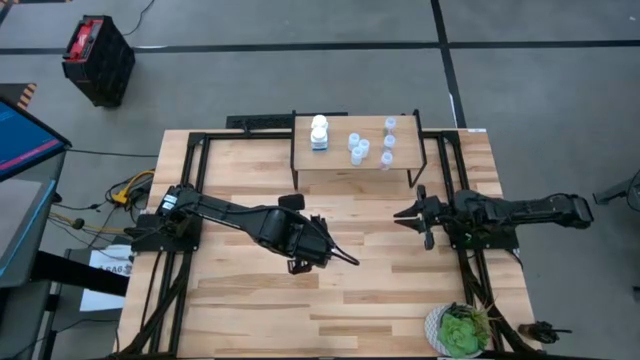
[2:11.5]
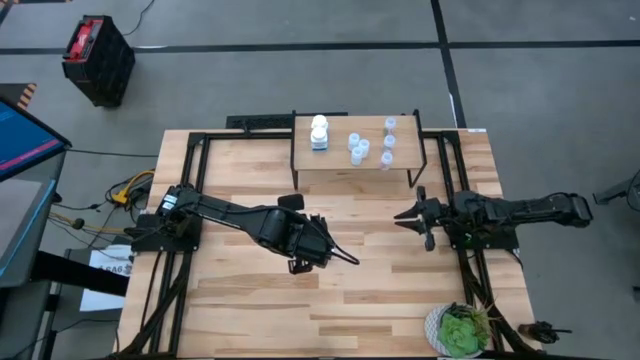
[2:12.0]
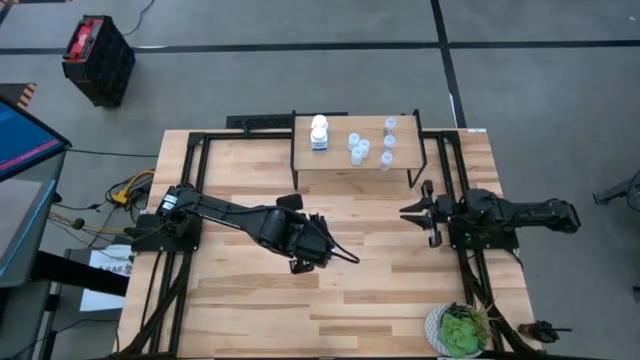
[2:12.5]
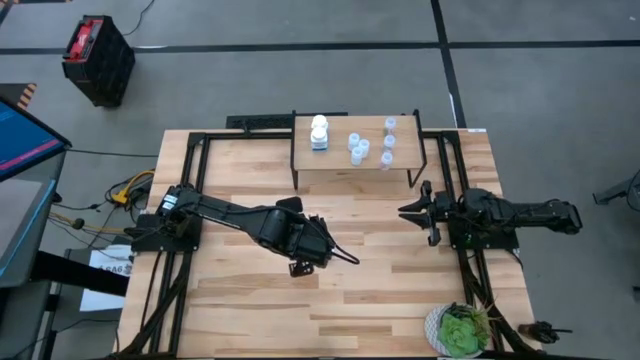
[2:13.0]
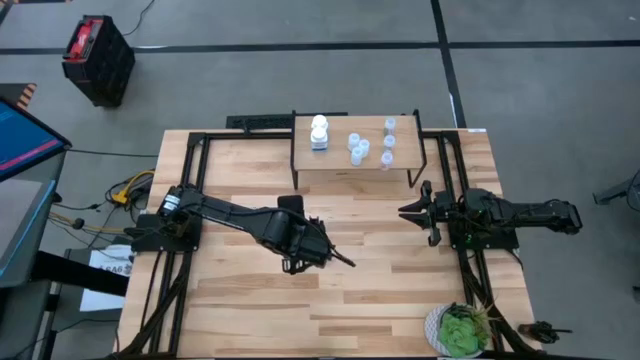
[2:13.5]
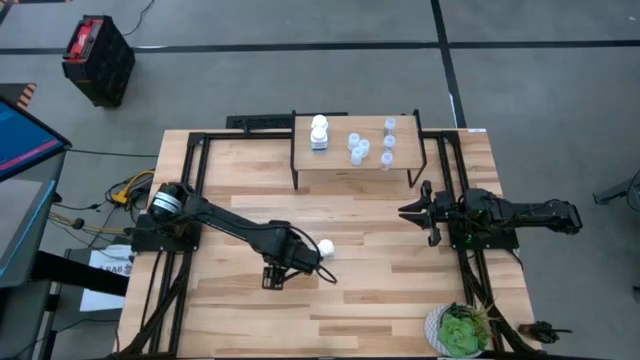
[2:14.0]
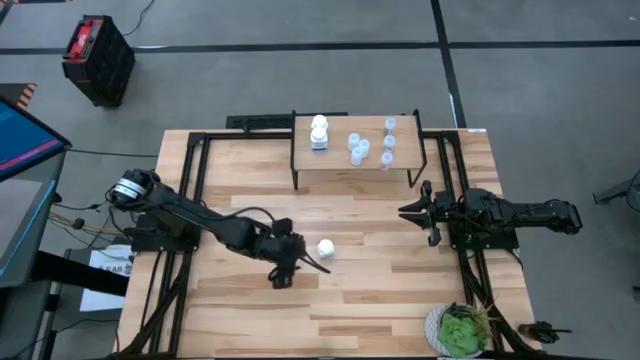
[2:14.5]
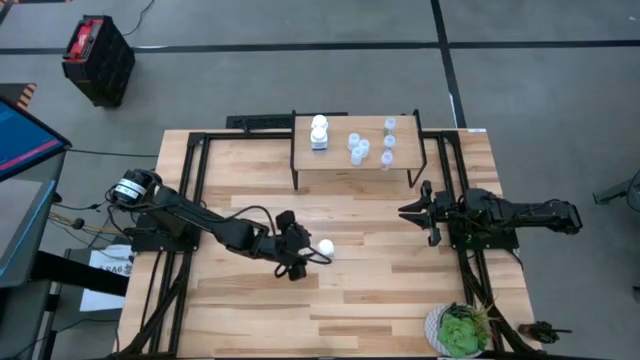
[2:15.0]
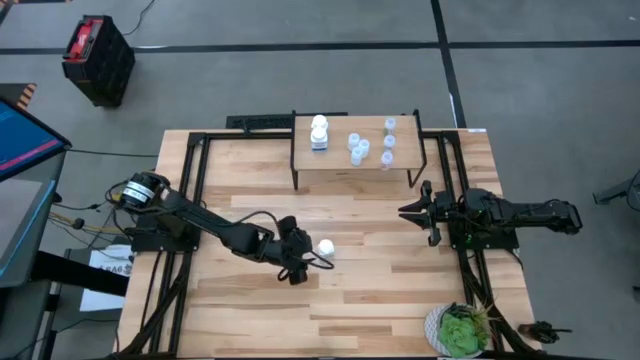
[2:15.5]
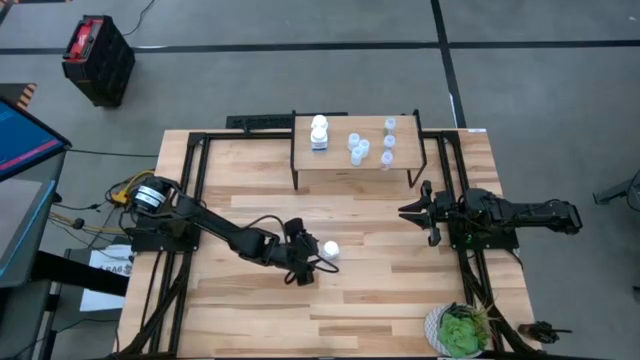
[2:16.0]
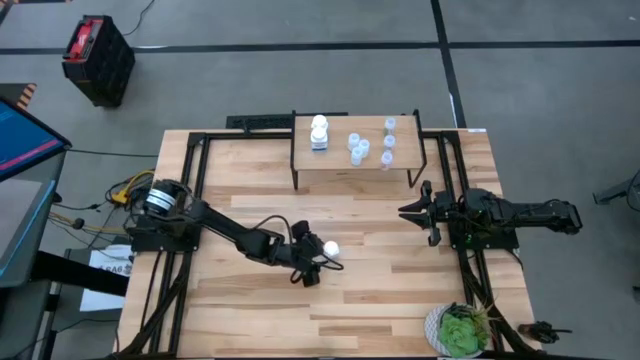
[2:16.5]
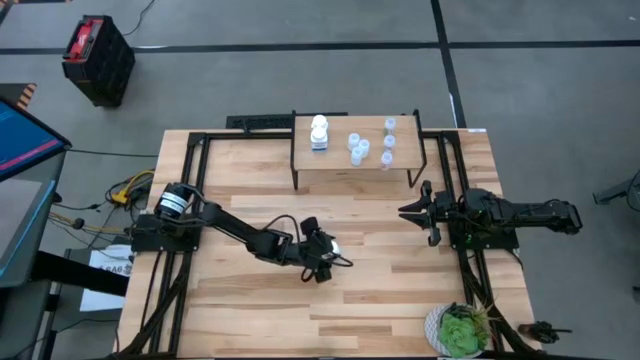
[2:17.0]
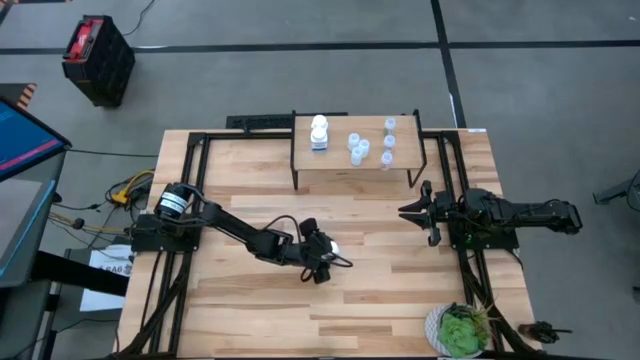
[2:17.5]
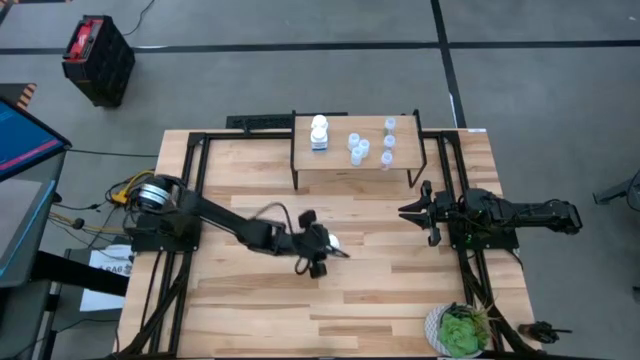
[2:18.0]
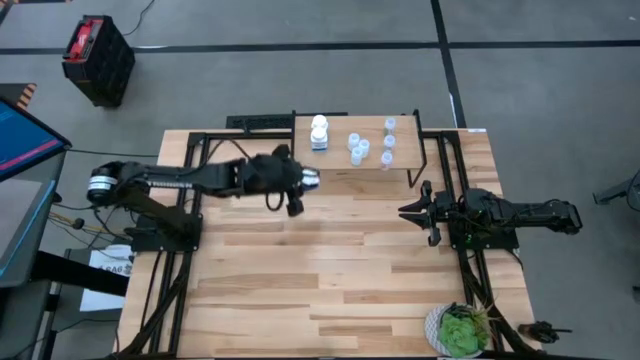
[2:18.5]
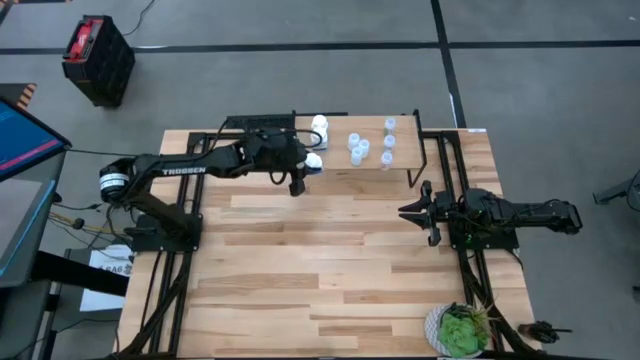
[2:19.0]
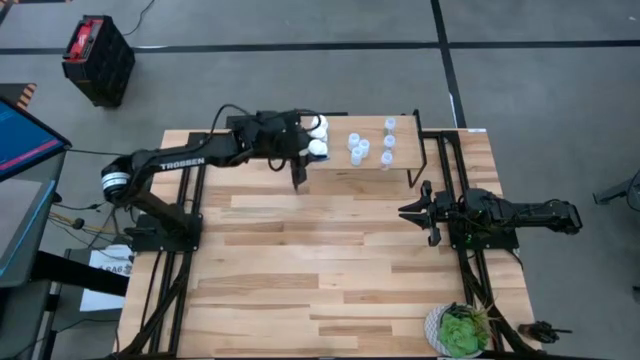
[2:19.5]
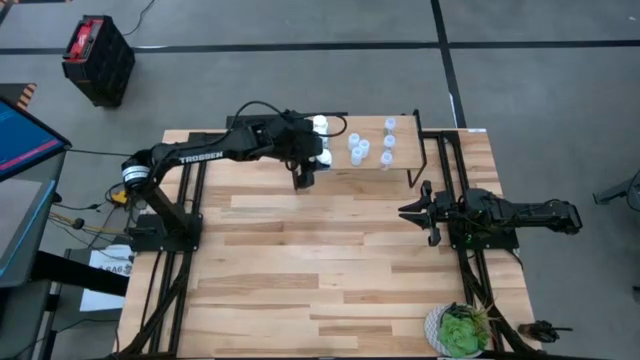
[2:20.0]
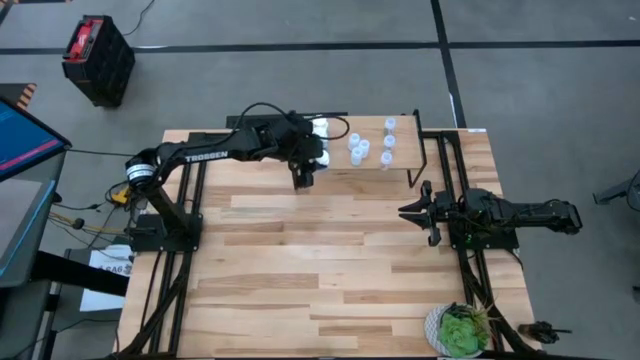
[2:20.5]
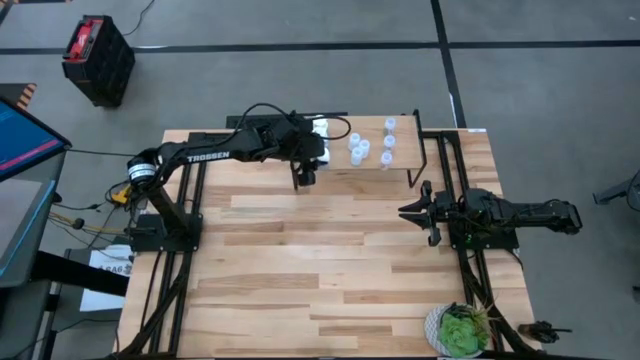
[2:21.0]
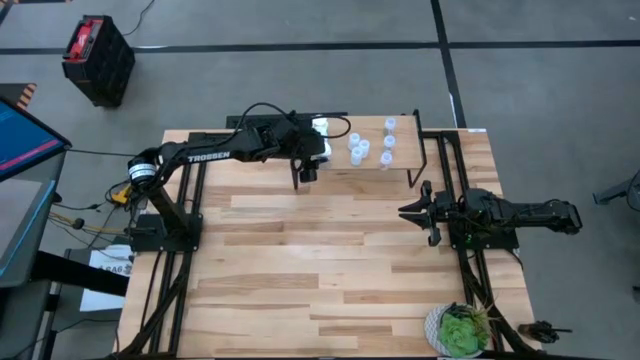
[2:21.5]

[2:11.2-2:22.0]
Task: Pick and place medicine bottles onto shelf by color
Put the opaque medicine bottle onto the left side of the shelf

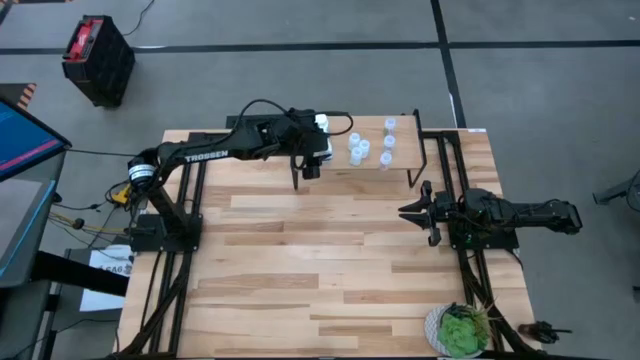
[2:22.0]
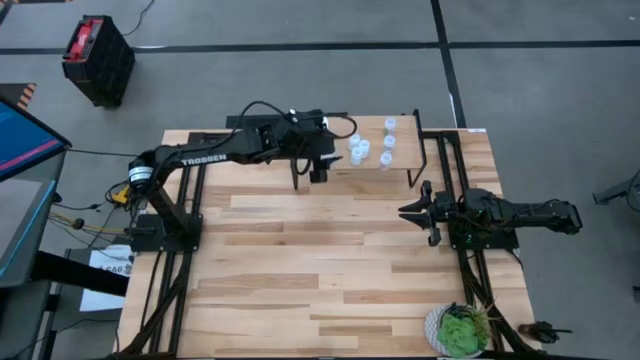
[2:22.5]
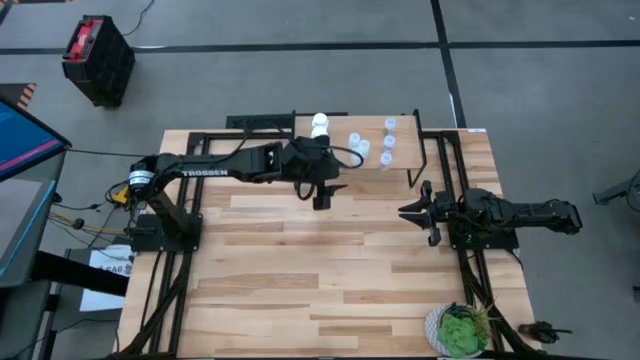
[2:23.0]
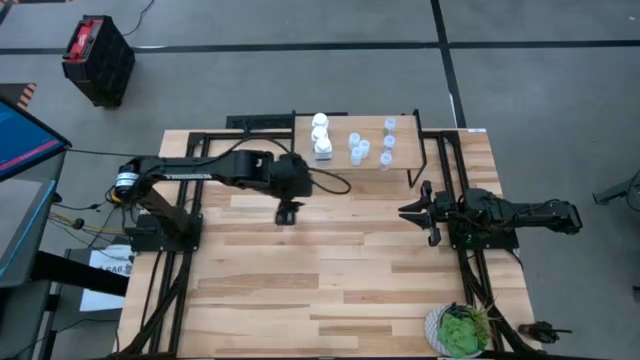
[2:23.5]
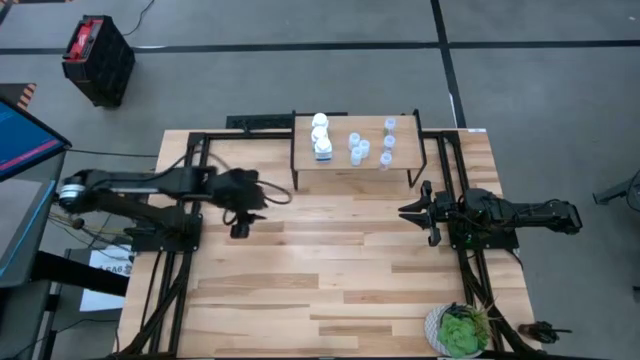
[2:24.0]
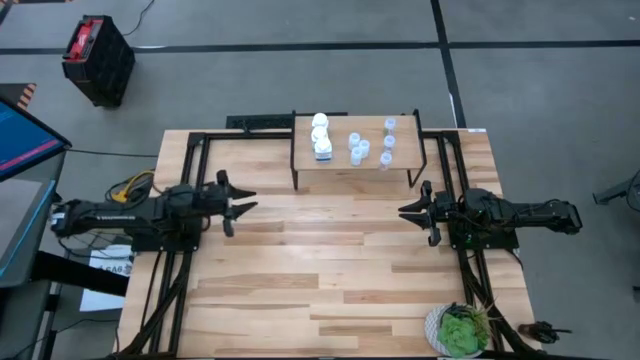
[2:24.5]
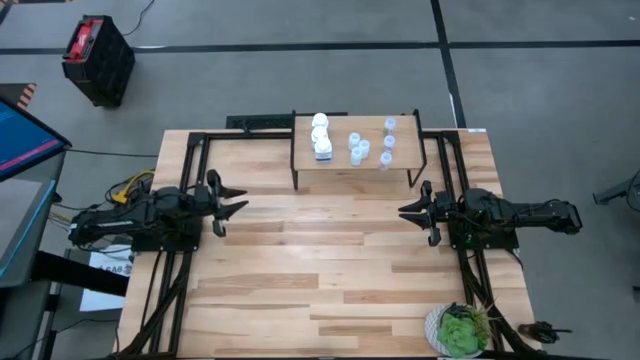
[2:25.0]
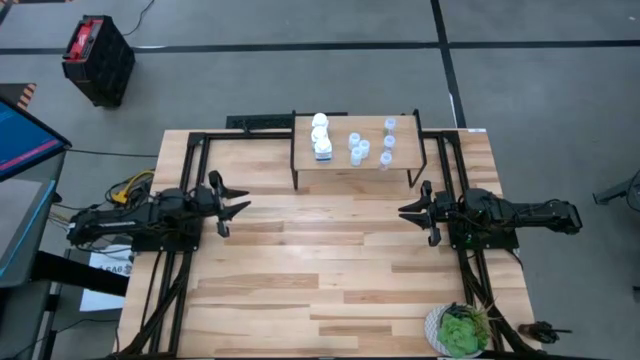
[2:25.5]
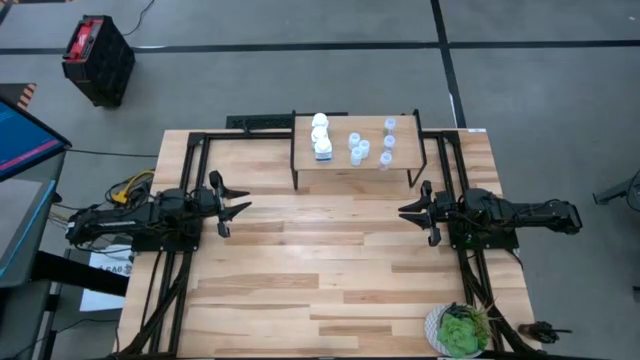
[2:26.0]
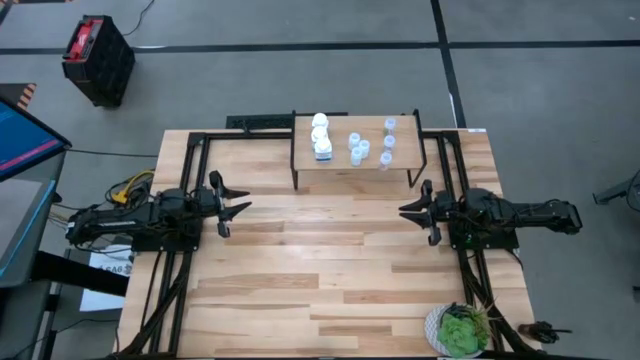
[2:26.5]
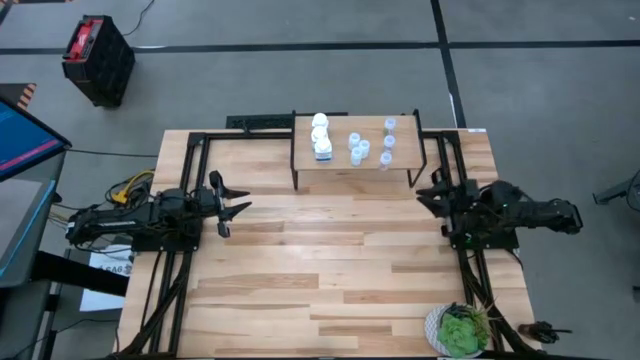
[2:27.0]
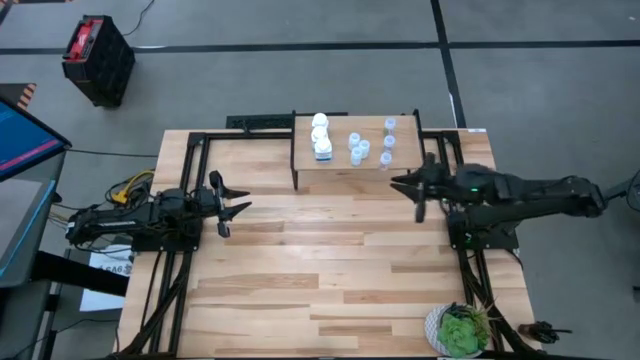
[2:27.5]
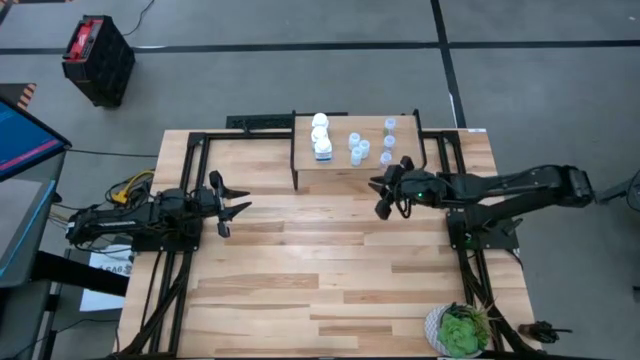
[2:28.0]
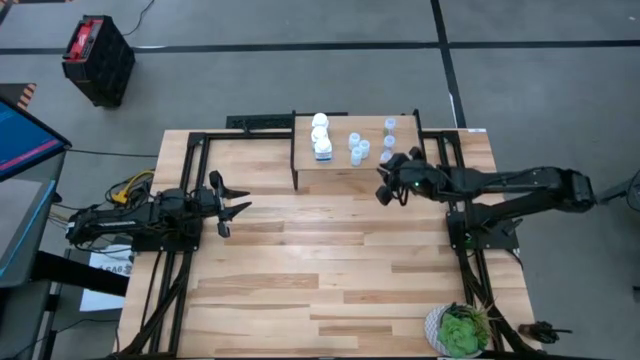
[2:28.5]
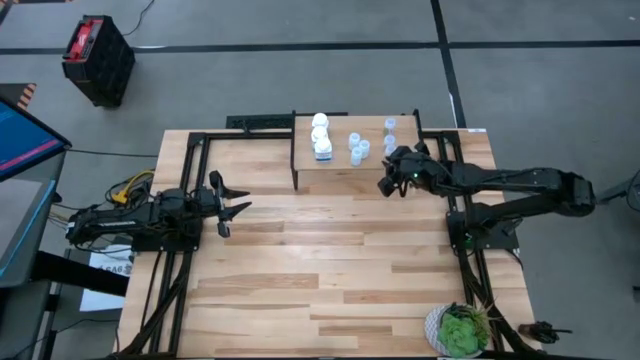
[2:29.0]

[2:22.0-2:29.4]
Adjust the transparent medicine bottle on the shelf

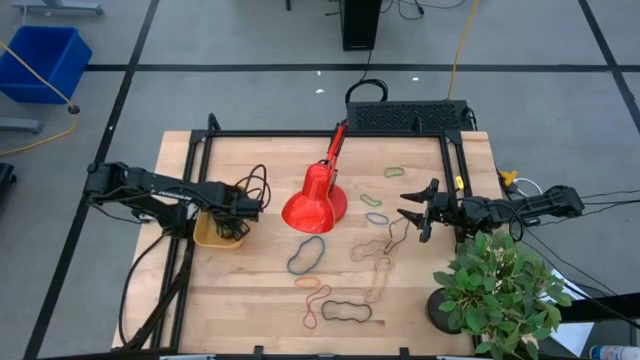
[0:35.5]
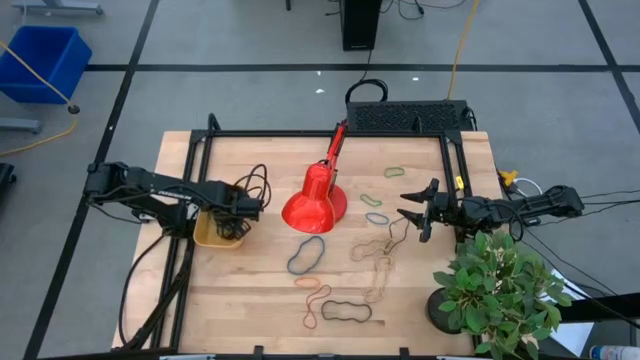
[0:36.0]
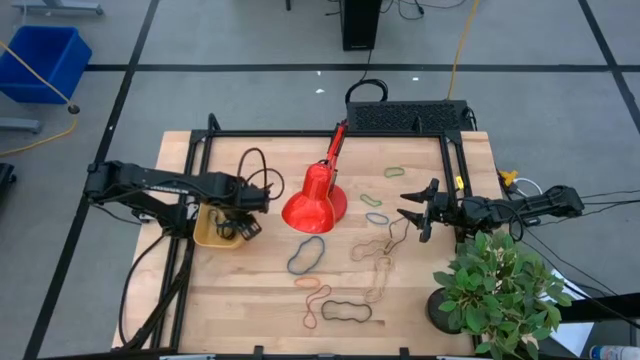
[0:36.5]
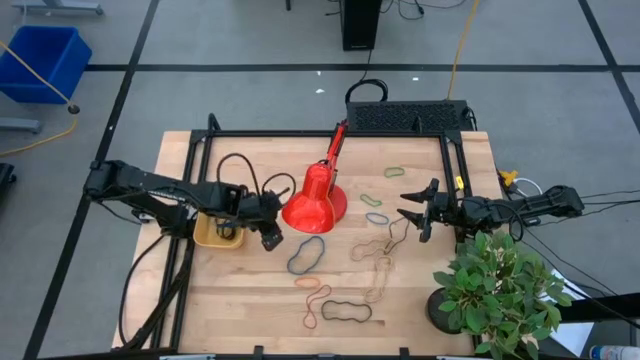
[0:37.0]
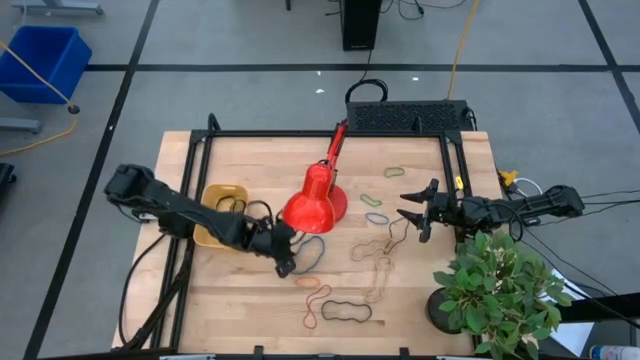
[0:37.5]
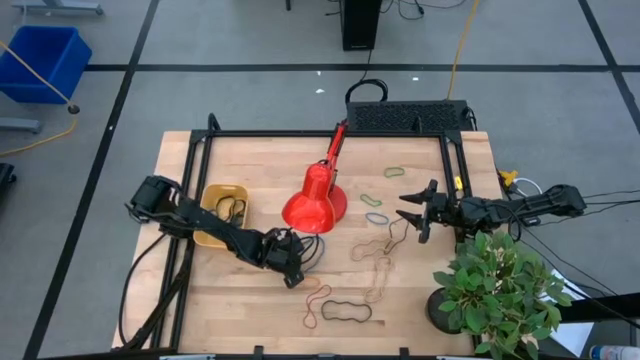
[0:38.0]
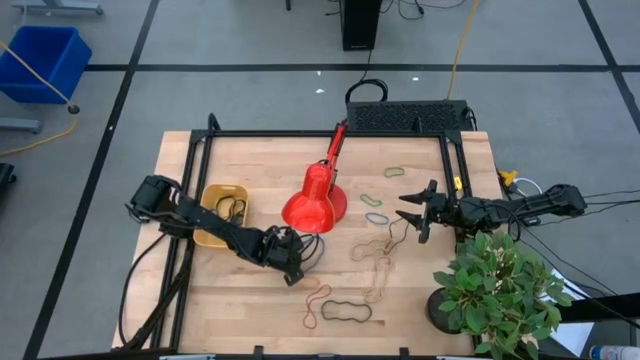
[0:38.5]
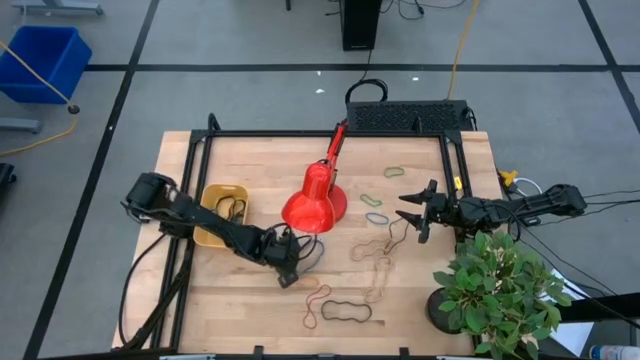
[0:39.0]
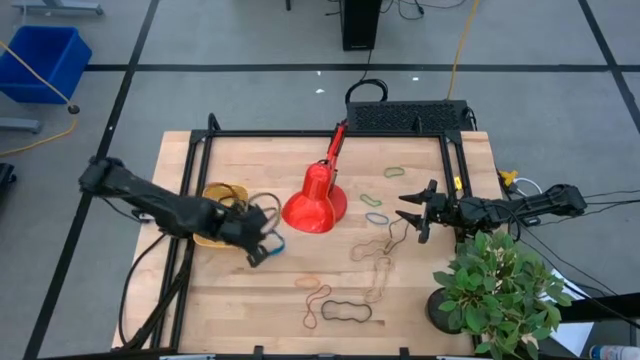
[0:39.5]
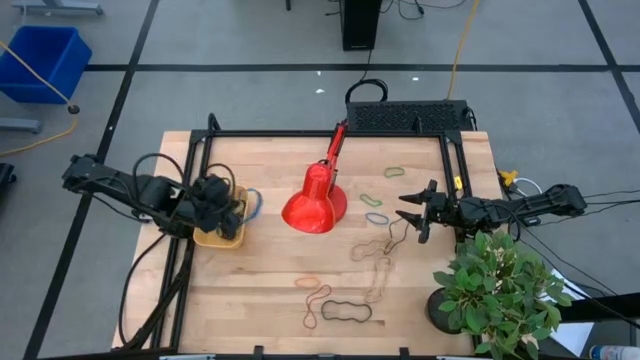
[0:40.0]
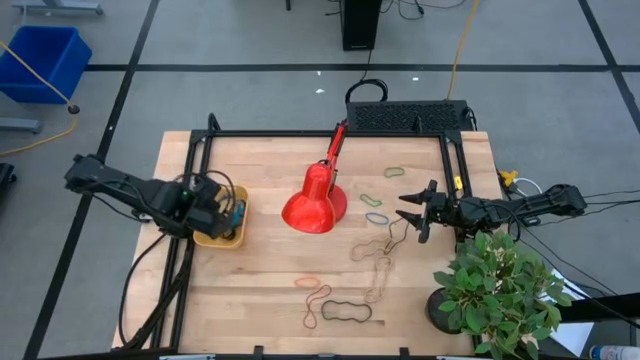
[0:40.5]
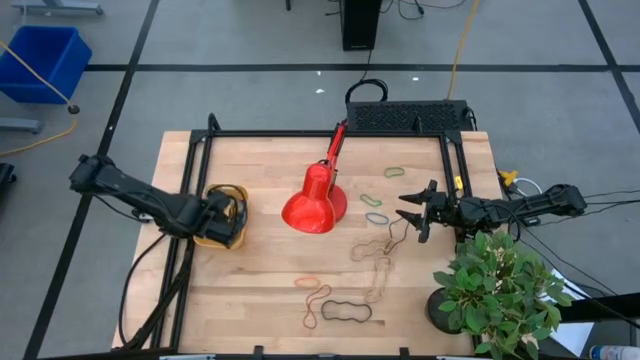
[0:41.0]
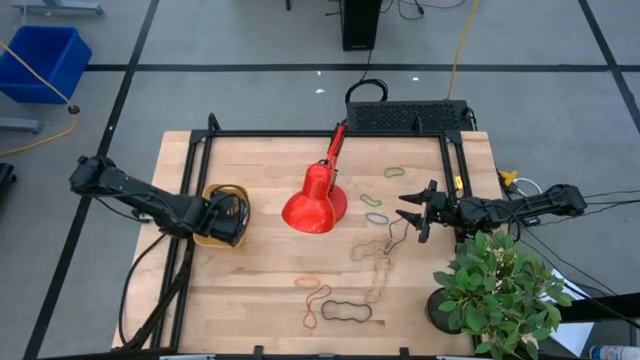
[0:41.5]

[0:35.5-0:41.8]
Task: Pick and place rubber bands into bin
Put the blue rubber band into the yellow bin
